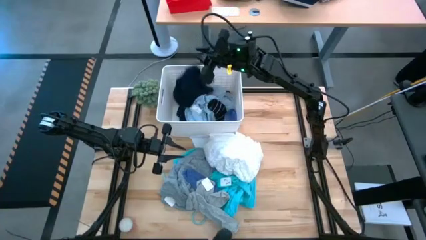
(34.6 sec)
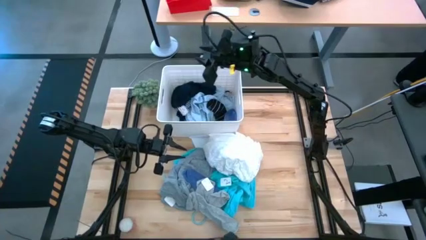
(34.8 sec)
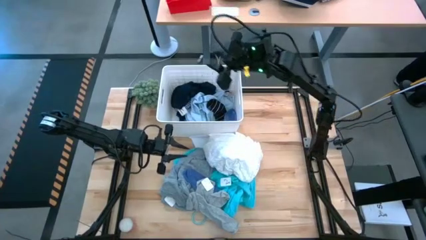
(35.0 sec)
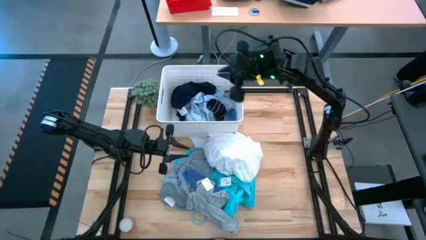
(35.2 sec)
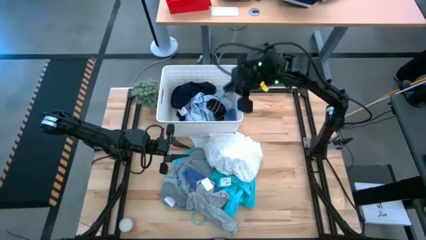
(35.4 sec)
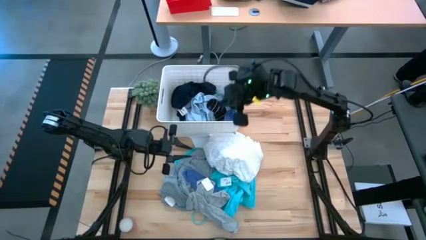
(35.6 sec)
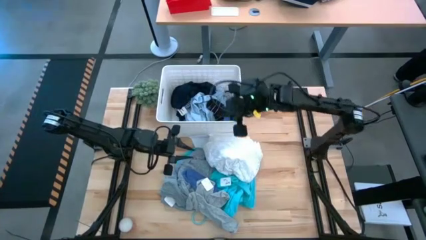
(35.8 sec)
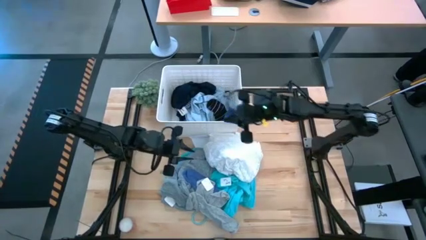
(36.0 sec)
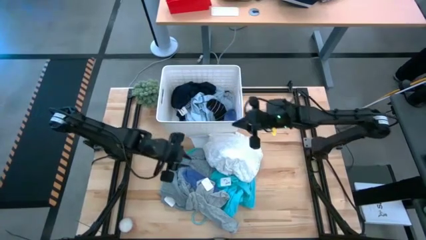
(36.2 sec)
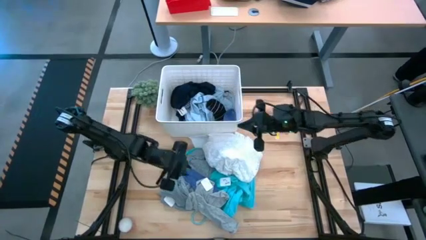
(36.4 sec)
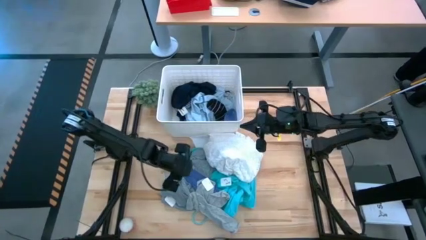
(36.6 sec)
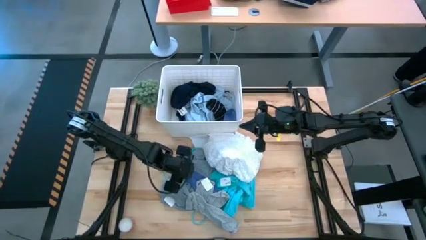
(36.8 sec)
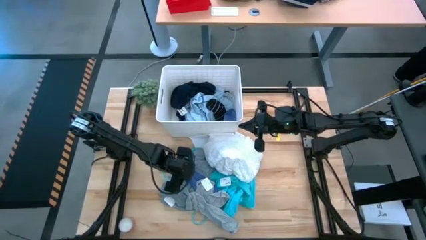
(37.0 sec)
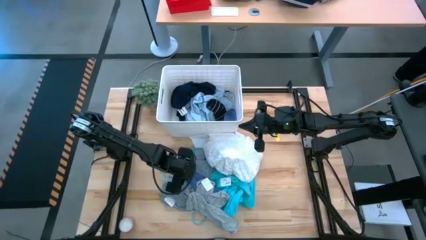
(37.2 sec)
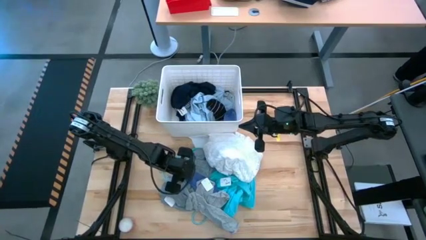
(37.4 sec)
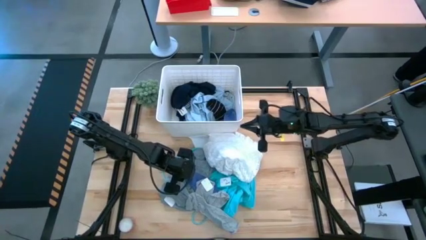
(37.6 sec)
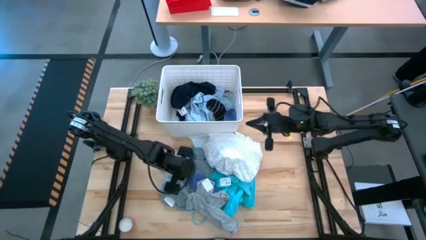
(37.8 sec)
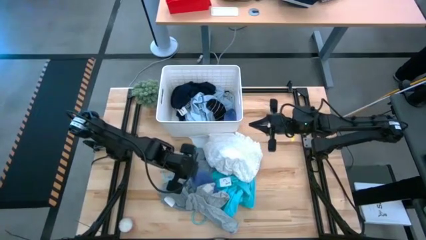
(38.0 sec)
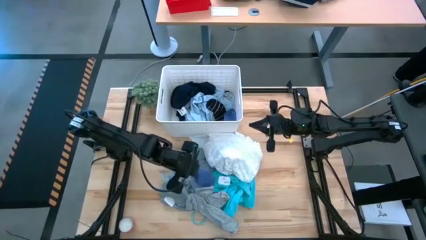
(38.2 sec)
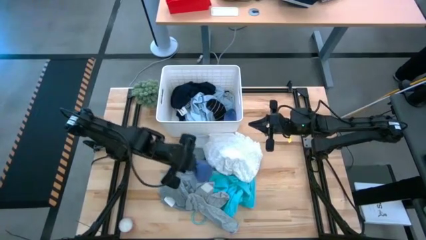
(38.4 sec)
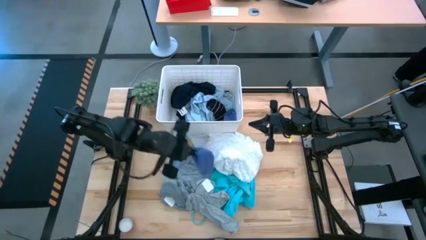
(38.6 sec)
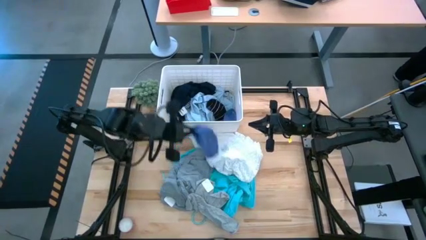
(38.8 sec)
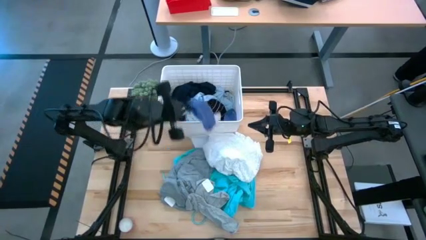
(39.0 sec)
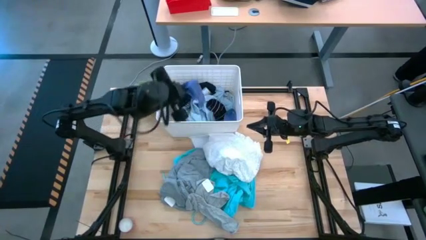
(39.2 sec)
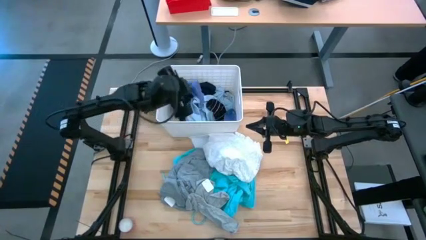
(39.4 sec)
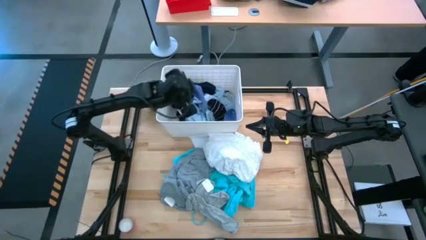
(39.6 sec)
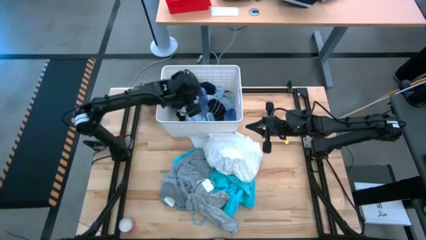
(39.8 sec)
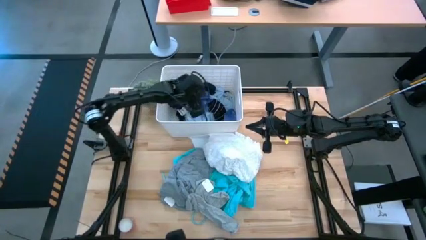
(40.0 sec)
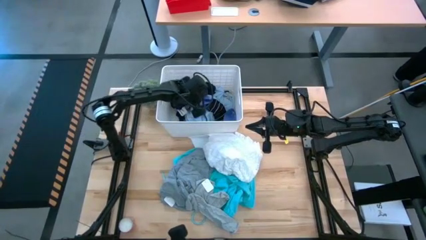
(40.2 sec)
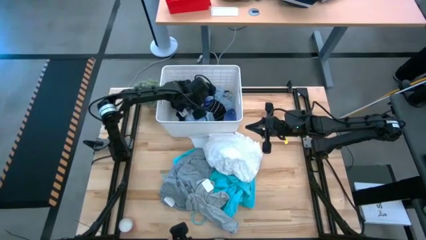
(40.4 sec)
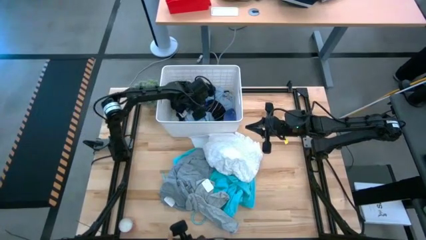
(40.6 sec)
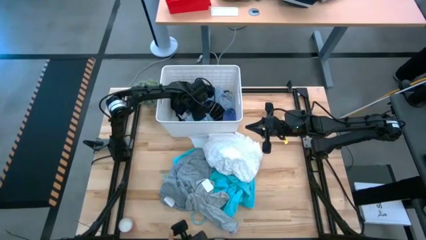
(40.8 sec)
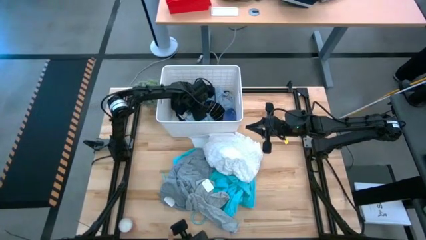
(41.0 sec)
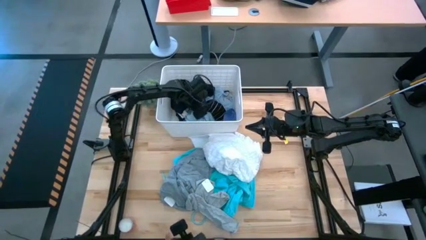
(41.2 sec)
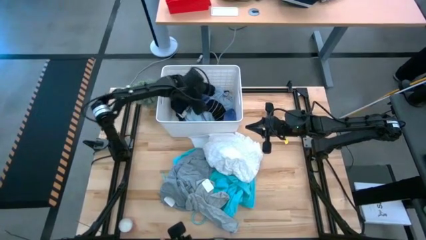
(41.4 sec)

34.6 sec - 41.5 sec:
Task: Sort clothes
Put the blue sock into the white bin

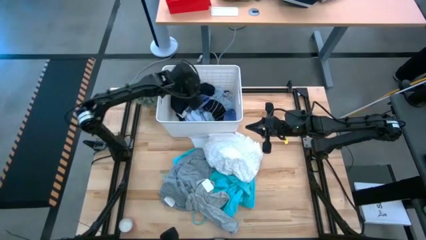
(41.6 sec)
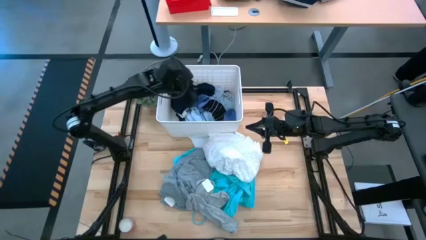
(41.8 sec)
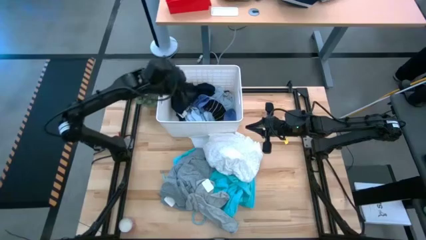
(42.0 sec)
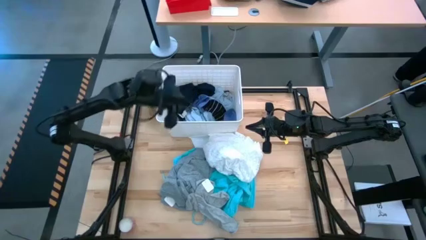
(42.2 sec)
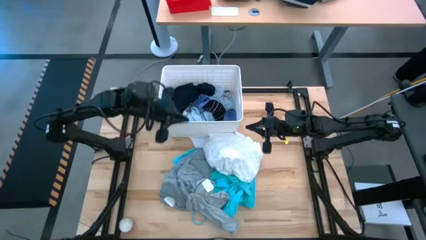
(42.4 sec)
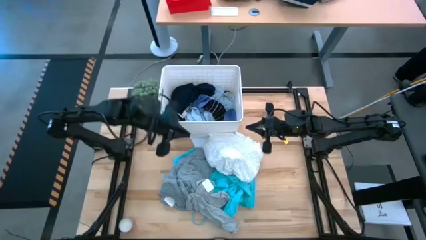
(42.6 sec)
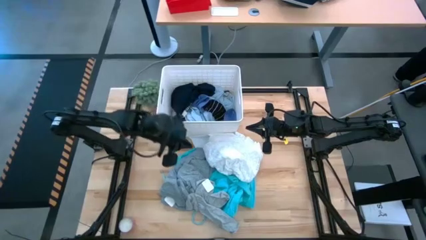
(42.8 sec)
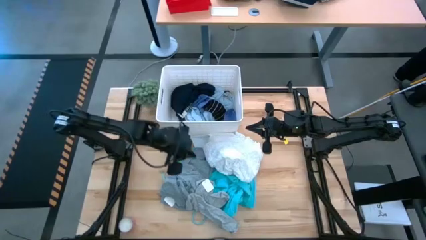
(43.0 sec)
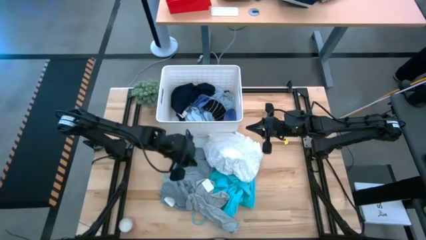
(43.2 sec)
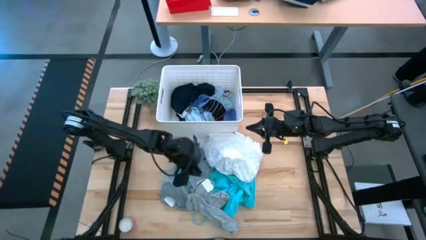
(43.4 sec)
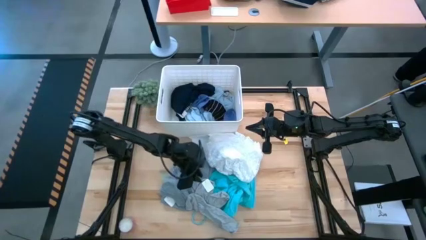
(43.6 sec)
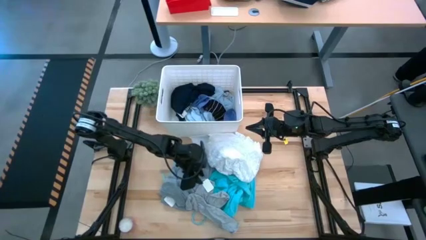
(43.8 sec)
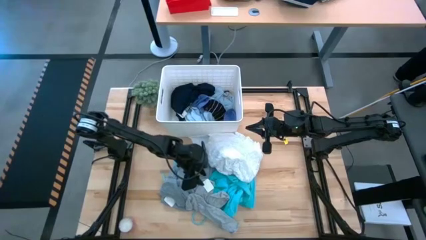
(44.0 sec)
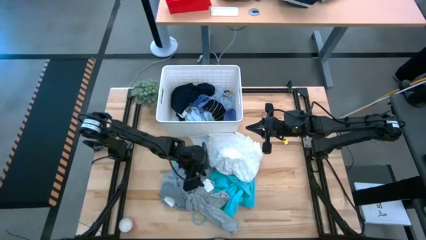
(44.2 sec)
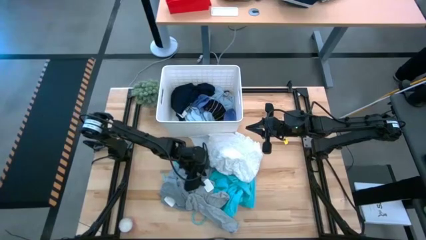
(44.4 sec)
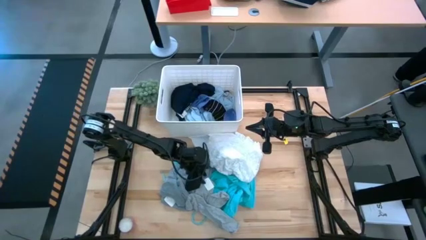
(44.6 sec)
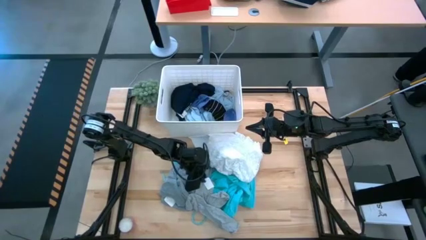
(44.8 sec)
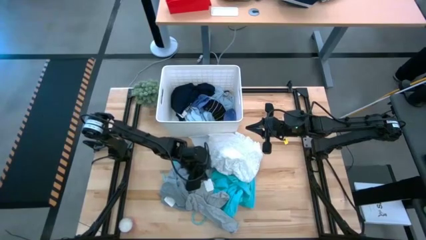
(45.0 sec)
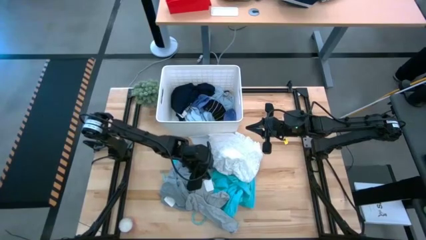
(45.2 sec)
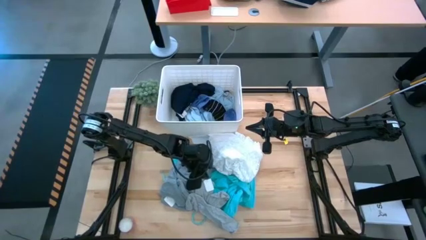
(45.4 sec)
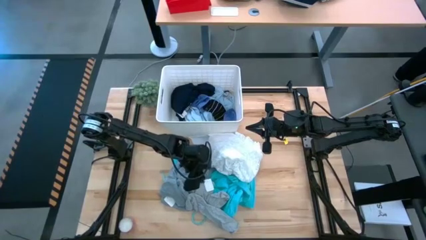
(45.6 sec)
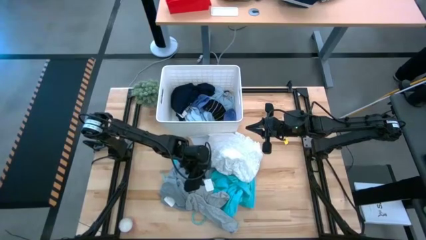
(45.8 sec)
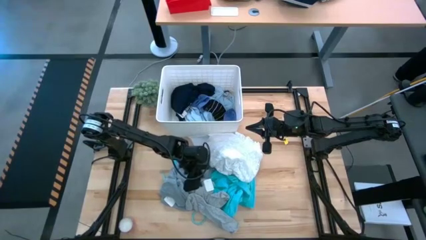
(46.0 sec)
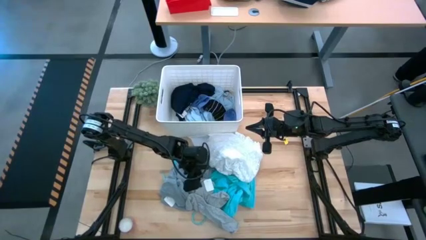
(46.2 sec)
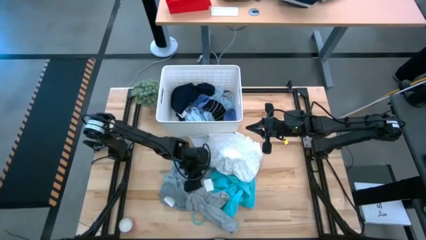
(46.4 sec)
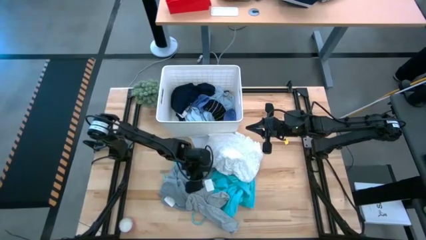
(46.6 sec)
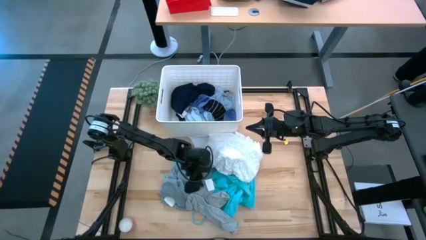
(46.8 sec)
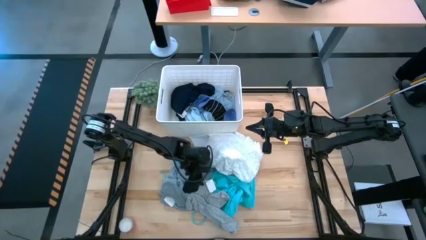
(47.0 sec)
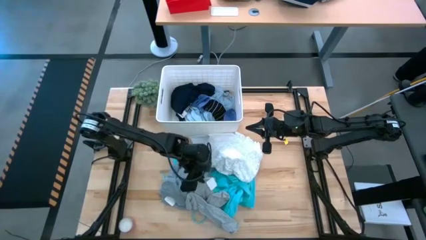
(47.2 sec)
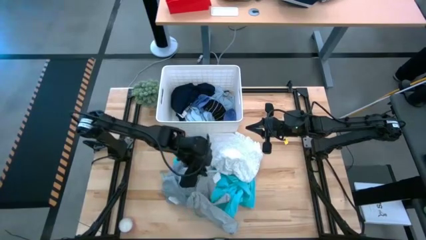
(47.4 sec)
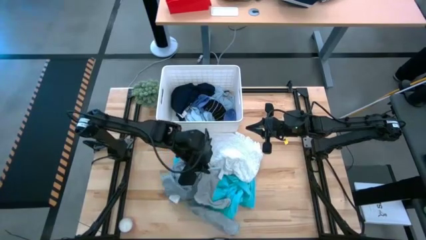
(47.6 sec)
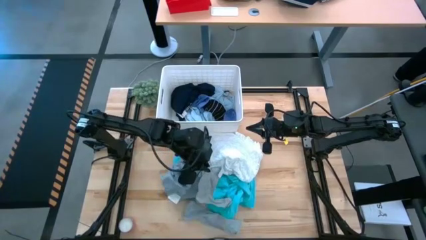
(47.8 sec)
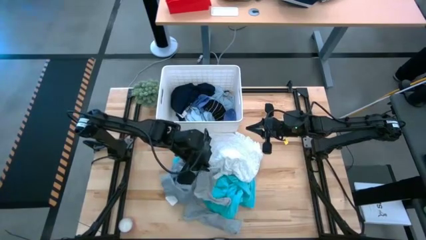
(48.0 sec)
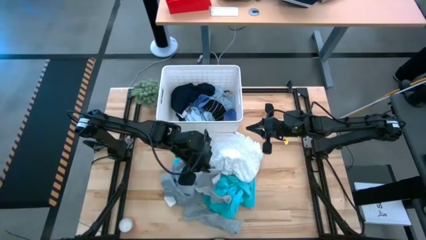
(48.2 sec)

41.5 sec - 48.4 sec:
Put the top gray sock into the white bin

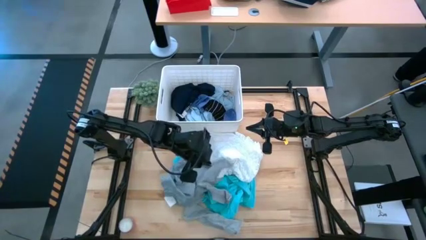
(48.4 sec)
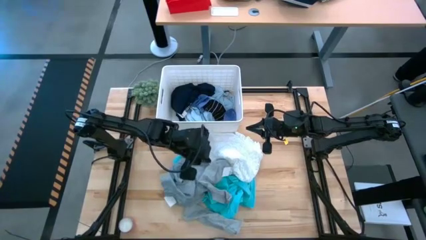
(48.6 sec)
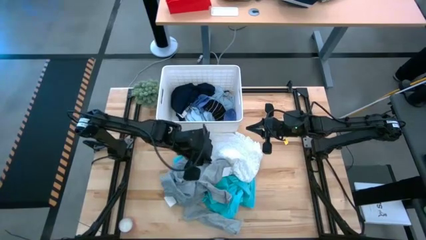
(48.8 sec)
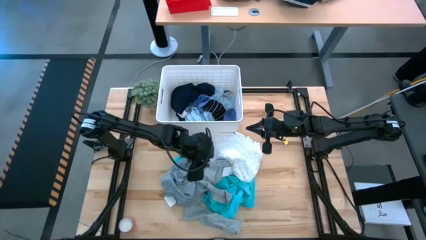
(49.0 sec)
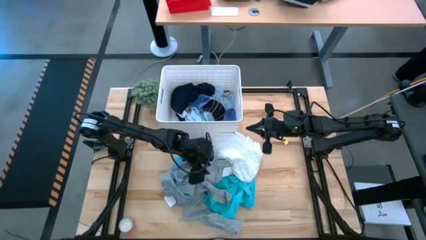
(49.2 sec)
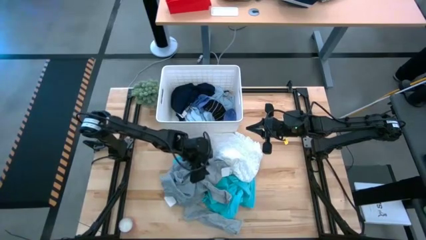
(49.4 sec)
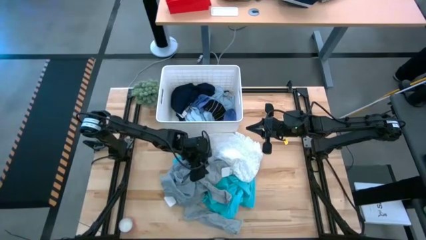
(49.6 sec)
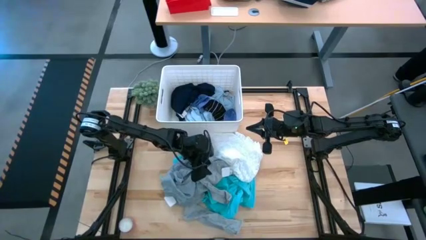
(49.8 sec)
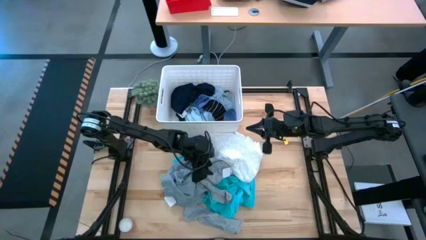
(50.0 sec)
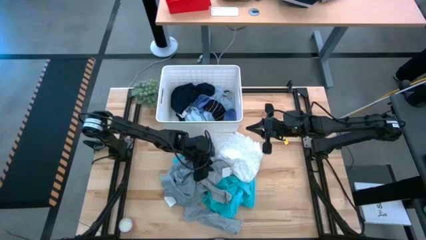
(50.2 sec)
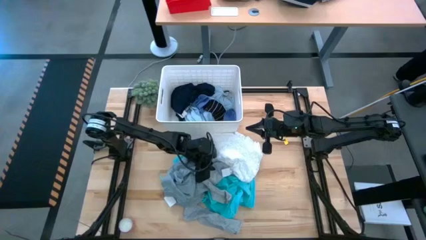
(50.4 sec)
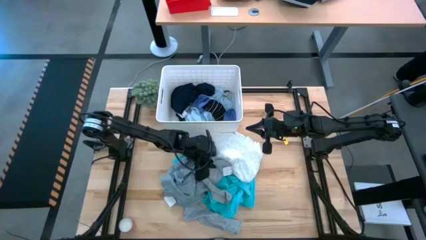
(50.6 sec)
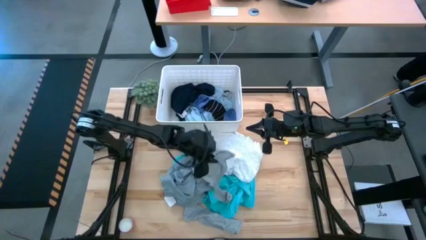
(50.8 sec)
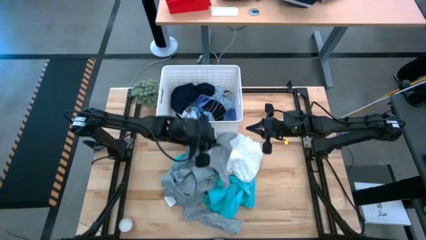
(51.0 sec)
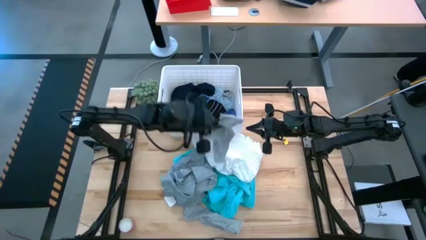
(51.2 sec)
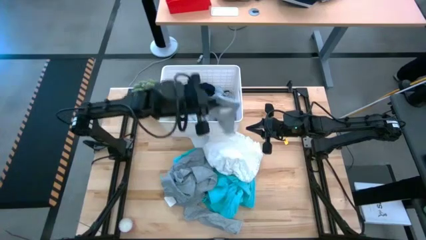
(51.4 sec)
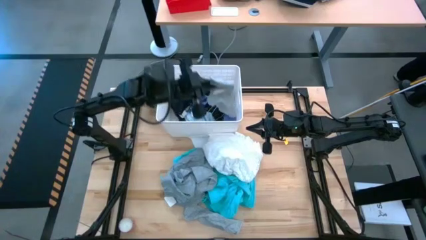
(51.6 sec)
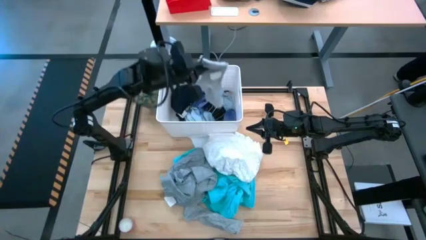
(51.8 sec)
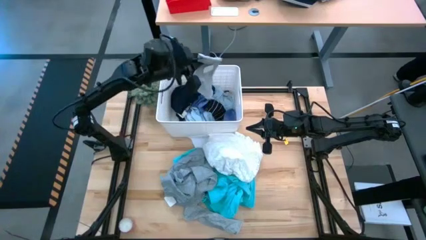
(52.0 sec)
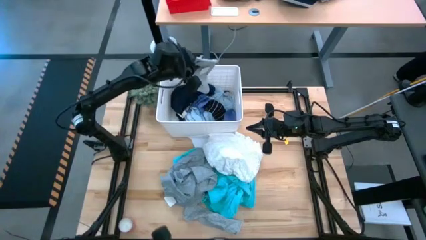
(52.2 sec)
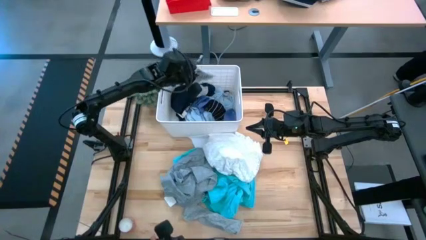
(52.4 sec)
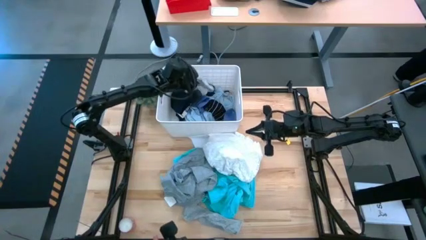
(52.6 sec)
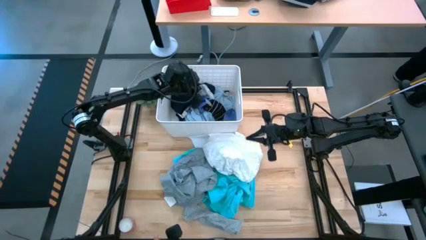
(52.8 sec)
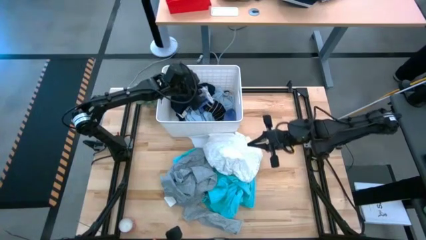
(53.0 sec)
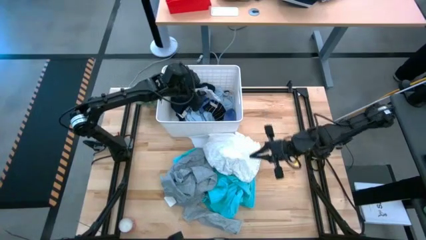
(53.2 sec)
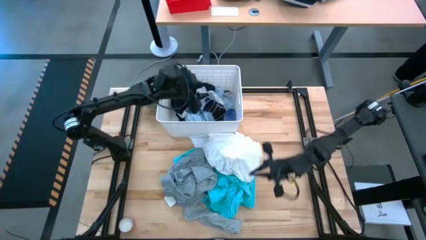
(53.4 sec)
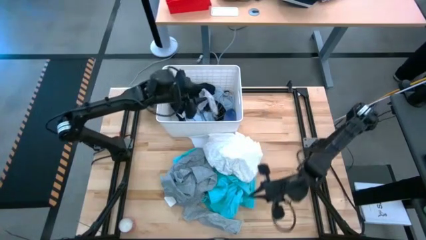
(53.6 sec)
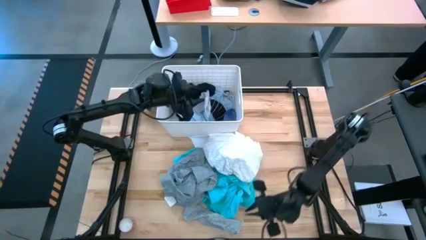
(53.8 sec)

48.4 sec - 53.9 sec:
Put the top gray sock into the white bin
